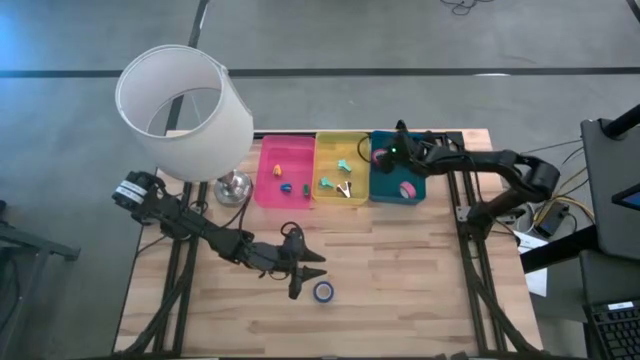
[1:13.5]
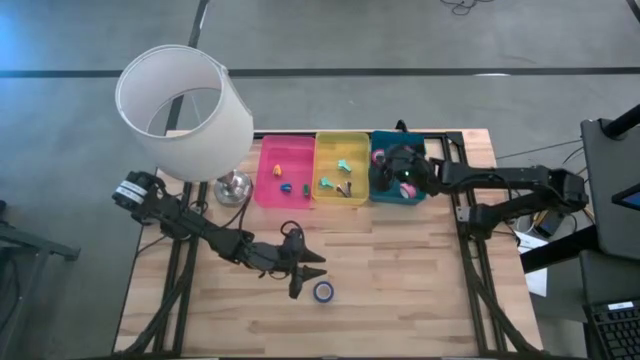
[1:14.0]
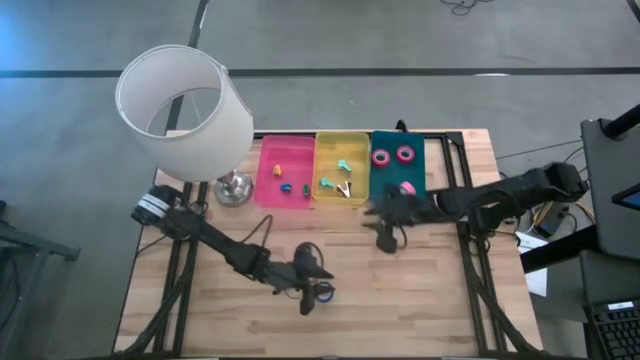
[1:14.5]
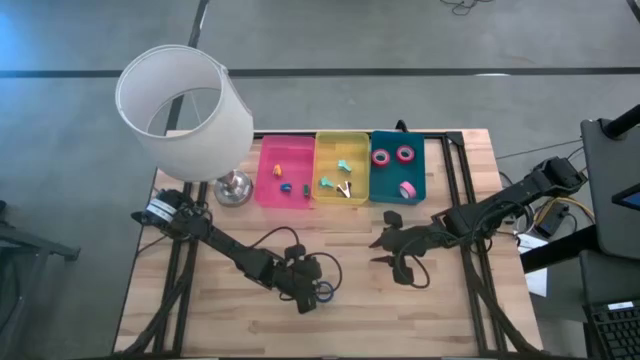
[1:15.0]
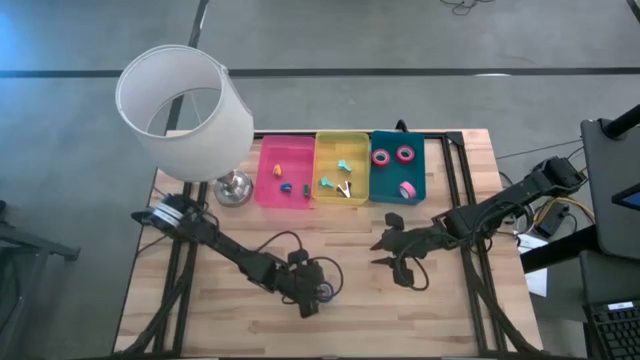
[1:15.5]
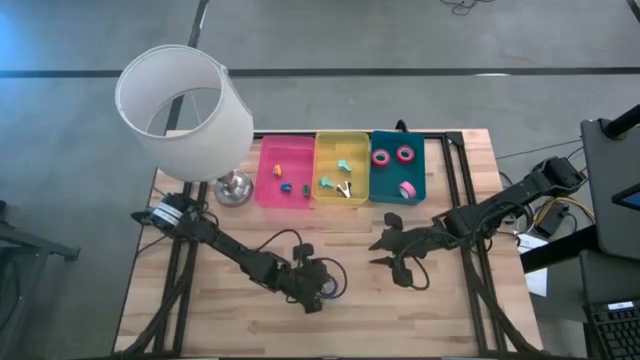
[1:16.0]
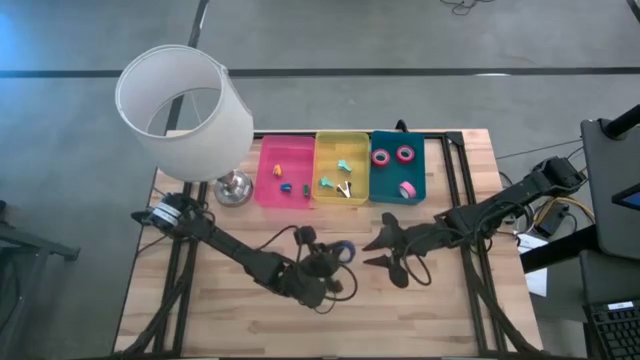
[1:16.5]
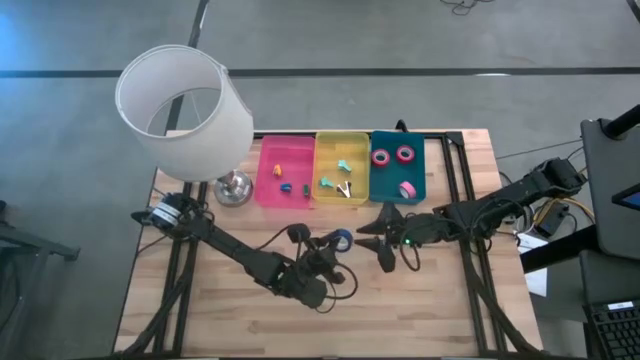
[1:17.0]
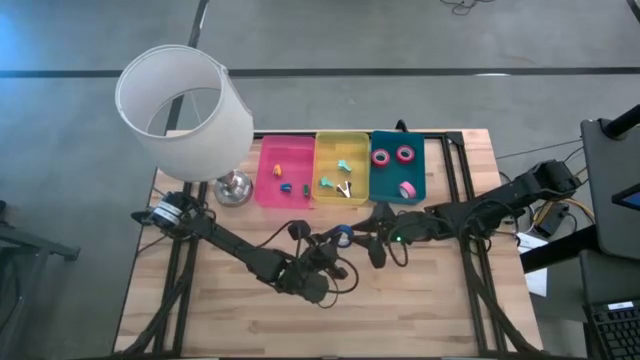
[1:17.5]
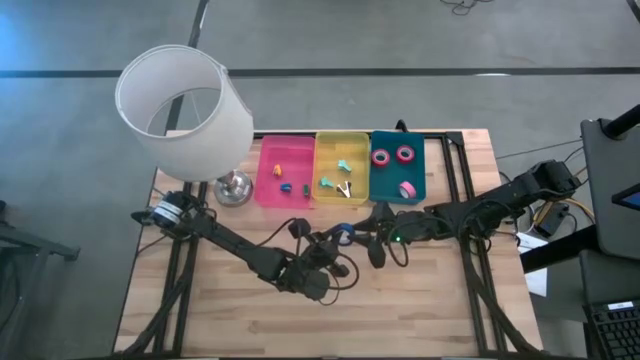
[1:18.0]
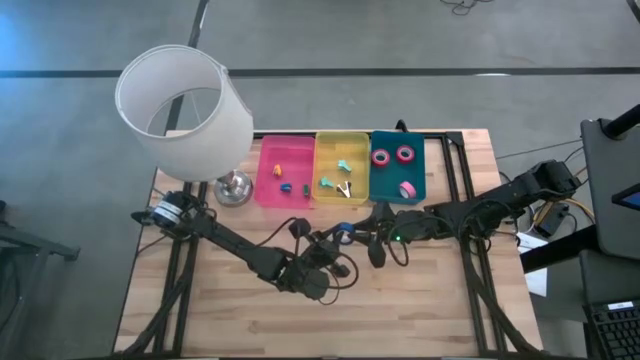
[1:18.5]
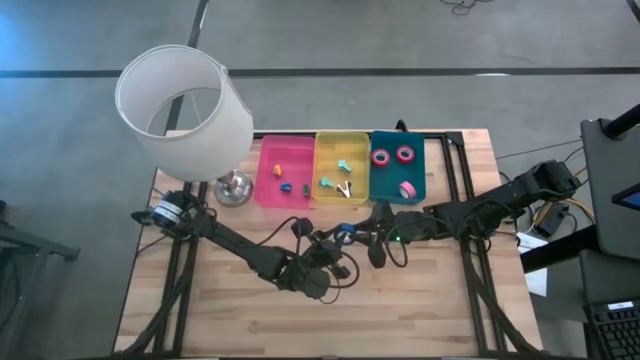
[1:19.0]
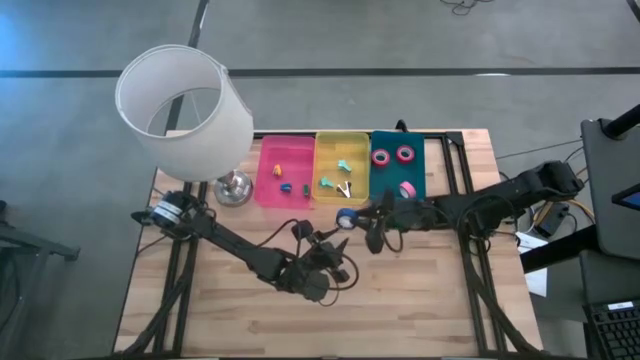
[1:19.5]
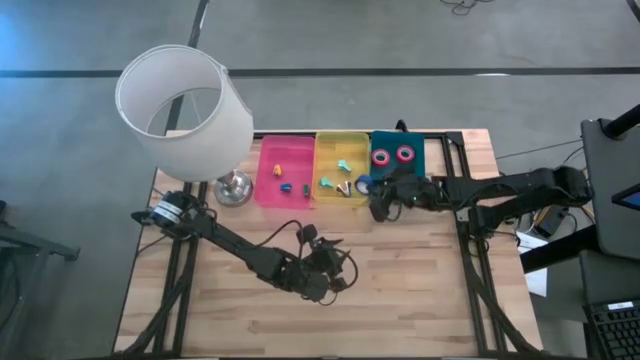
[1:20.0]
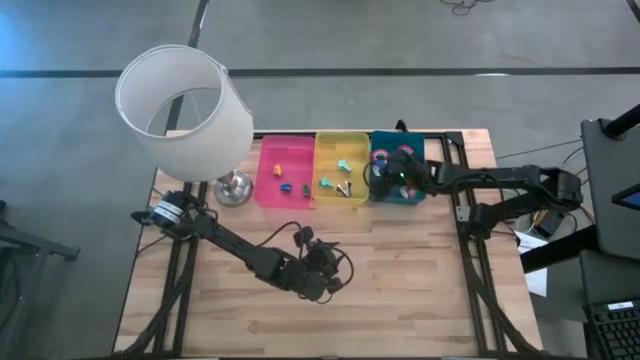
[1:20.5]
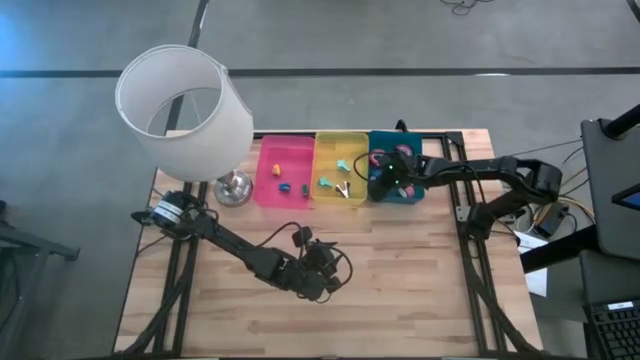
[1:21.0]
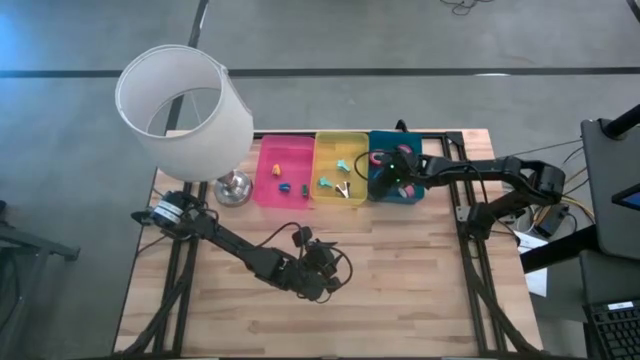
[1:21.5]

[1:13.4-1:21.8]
Task: Pick and place Stapler, Stapler remover, tape
Put the blue tape into the blue bin

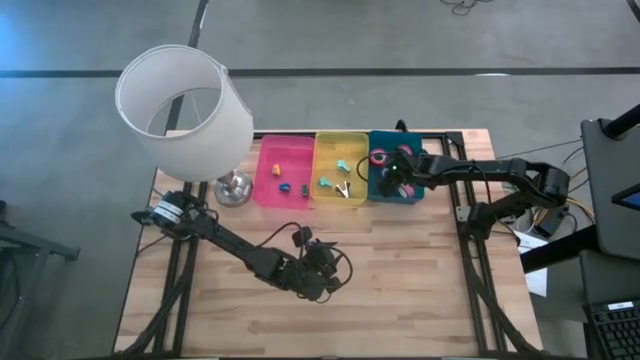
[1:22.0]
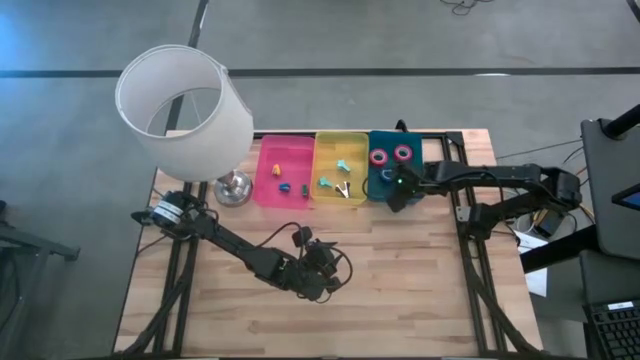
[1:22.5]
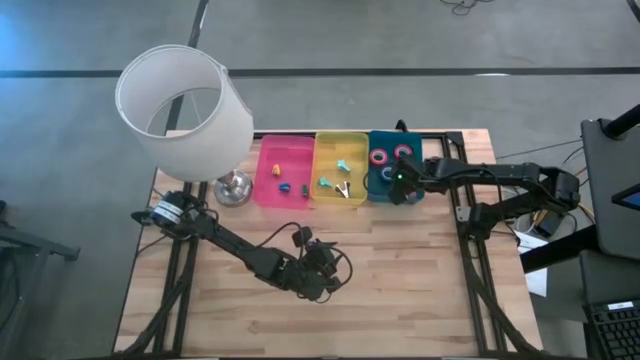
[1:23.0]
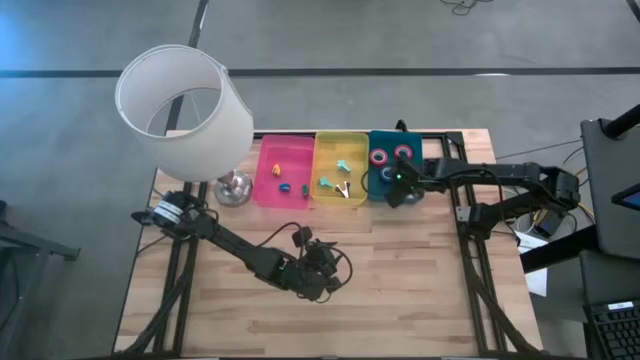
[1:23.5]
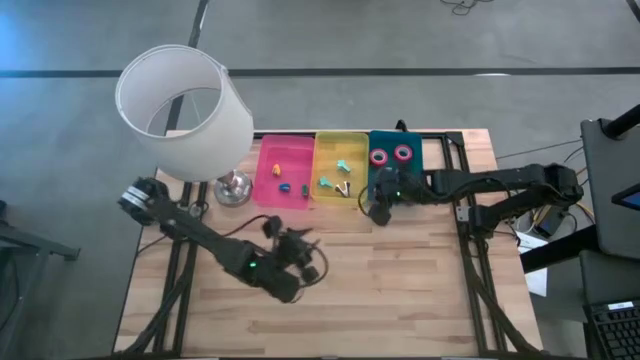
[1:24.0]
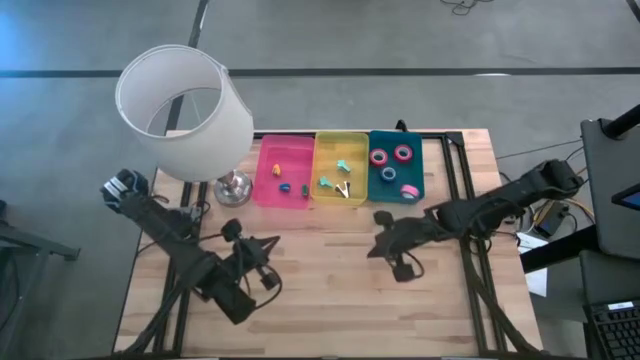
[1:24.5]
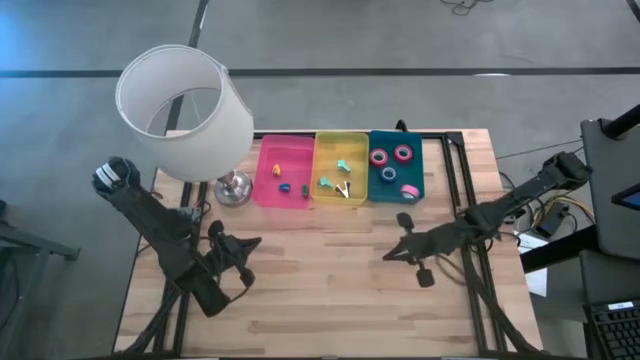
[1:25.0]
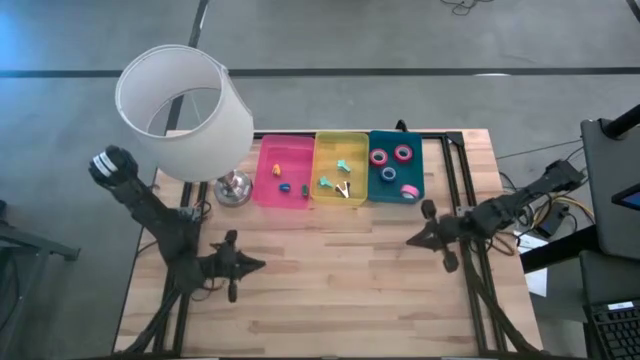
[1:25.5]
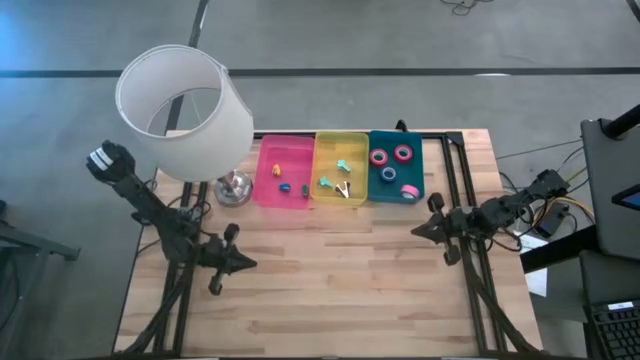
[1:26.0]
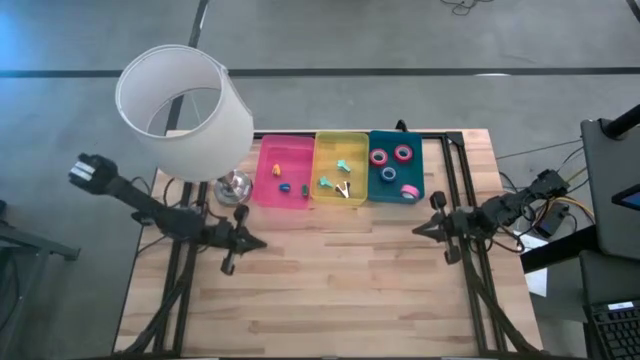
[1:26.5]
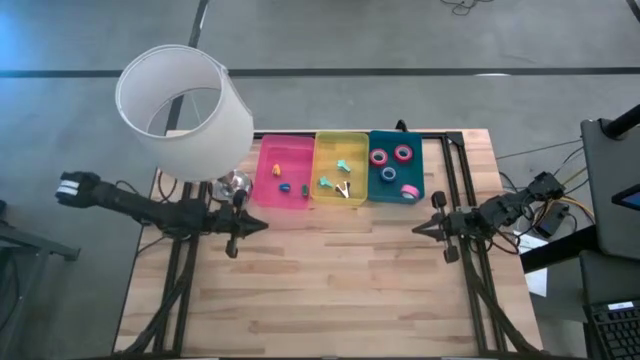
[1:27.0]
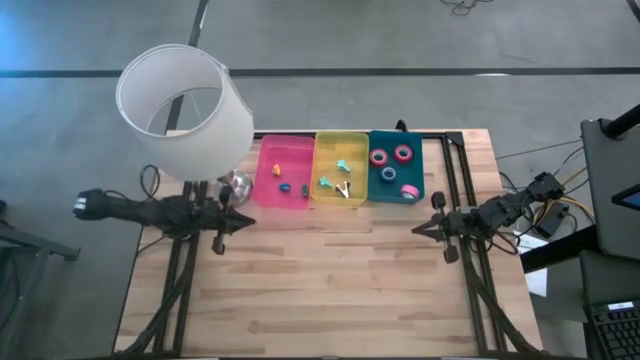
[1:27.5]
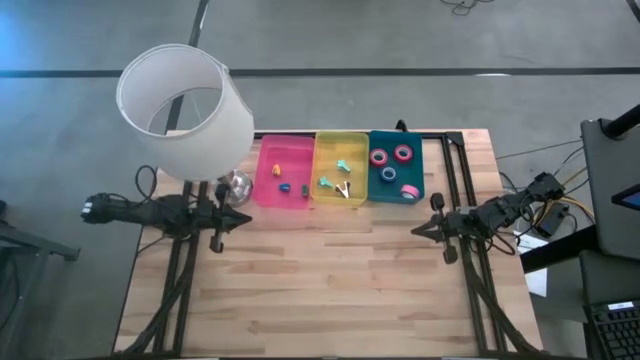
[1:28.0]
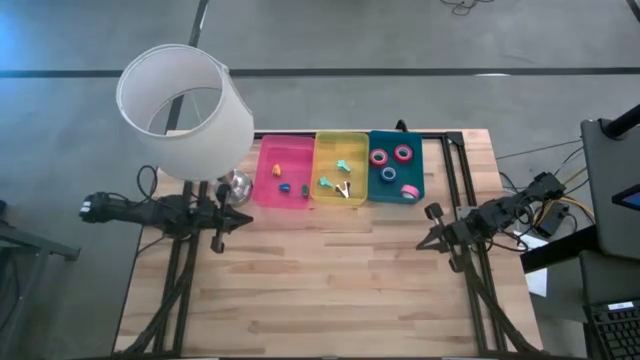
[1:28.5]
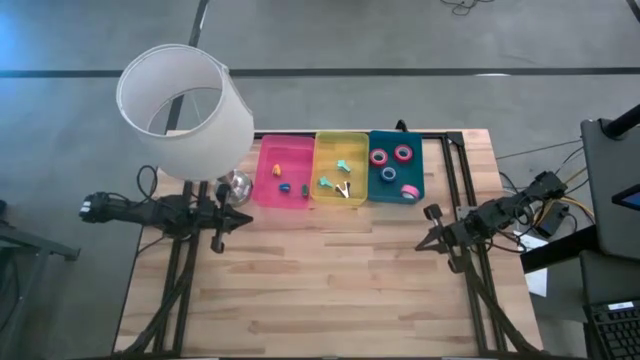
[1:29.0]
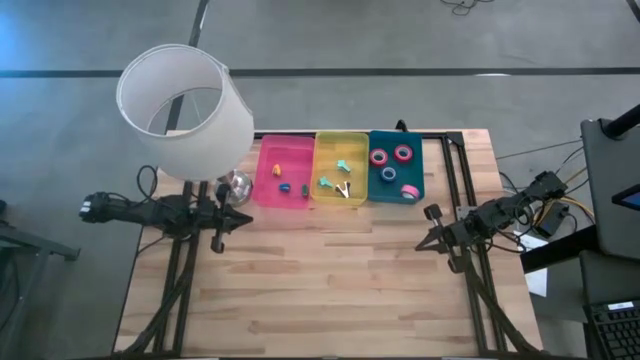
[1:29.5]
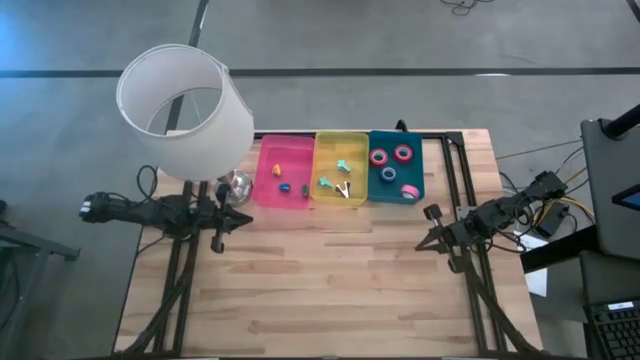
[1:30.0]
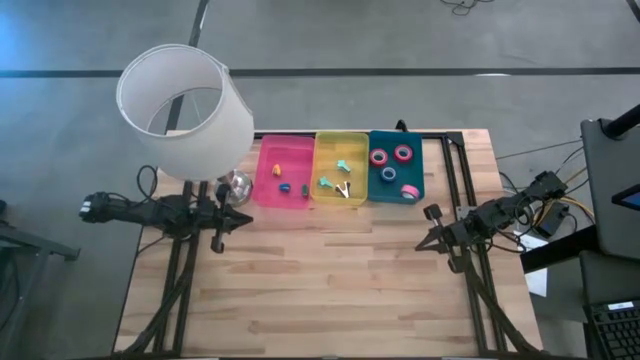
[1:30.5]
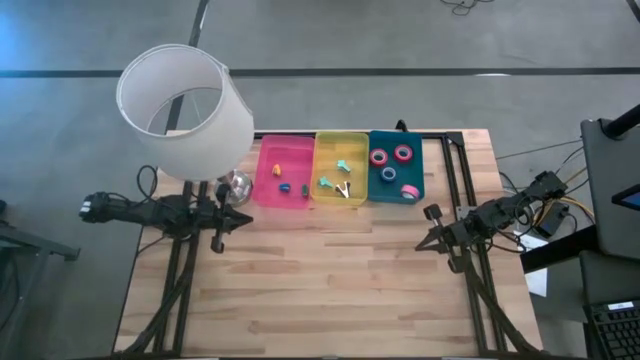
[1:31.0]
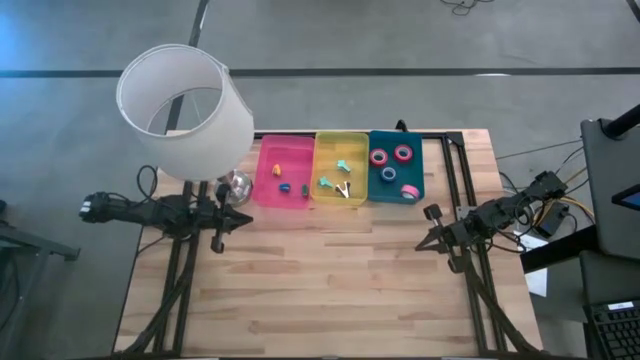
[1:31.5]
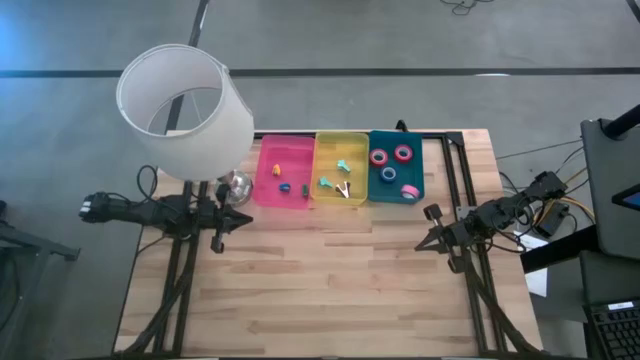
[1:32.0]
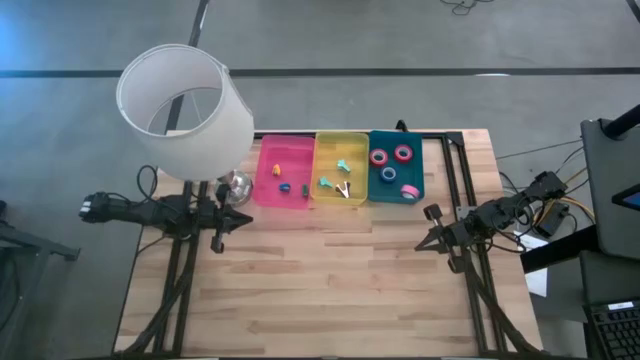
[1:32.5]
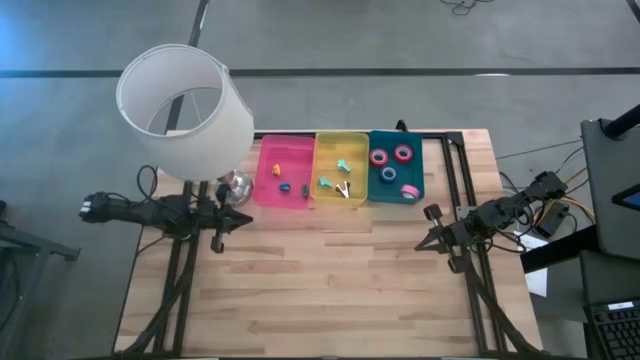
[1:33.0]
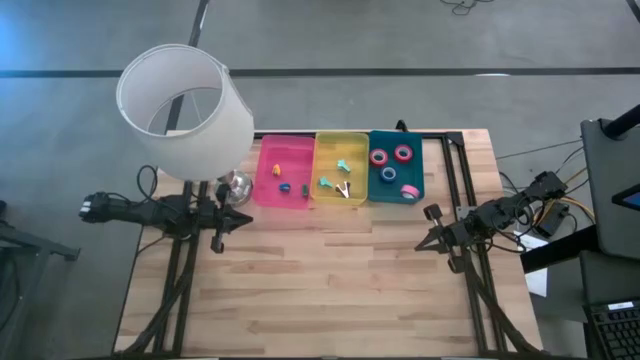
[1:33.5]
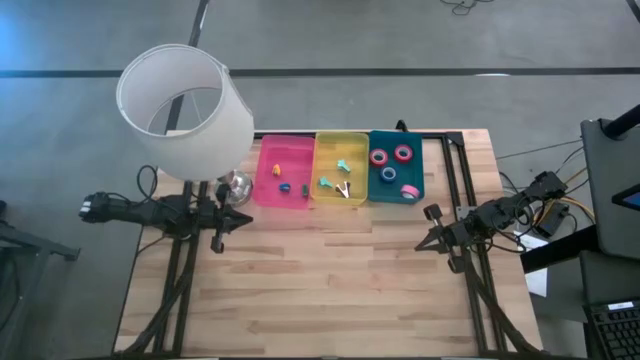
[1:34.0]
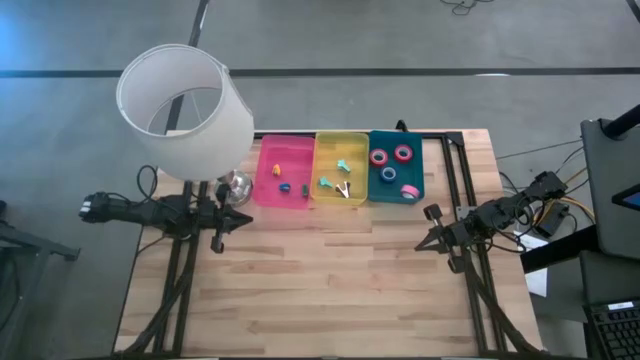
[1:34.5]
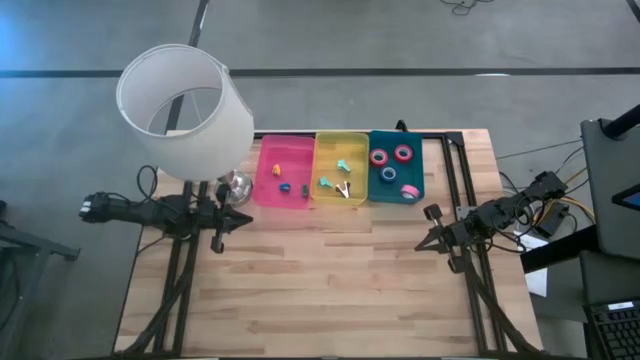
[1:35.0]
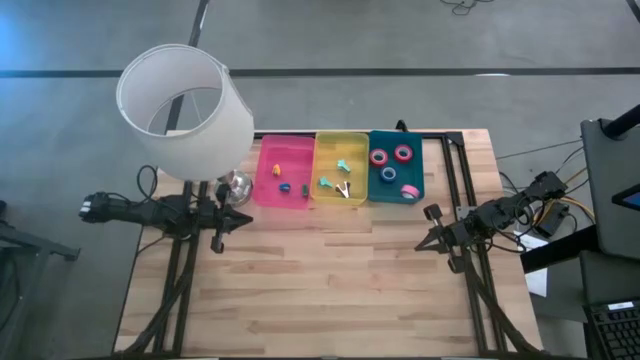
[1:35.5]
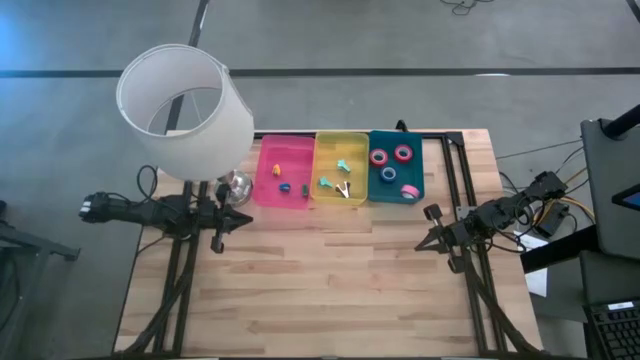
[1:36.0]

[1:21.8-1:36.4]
Return to Home Position
